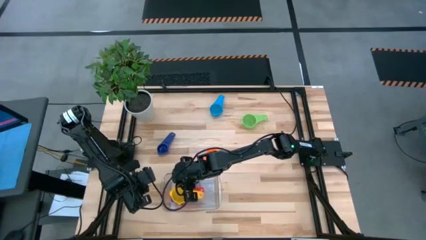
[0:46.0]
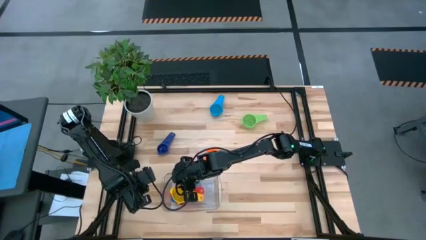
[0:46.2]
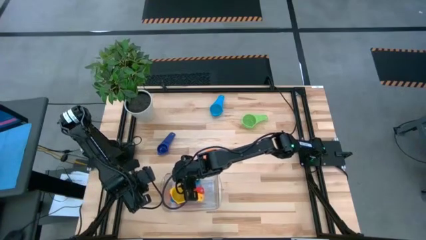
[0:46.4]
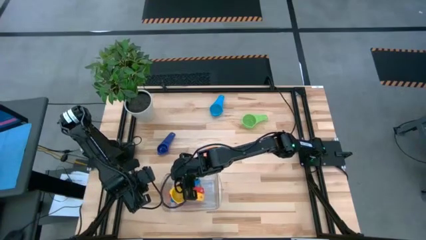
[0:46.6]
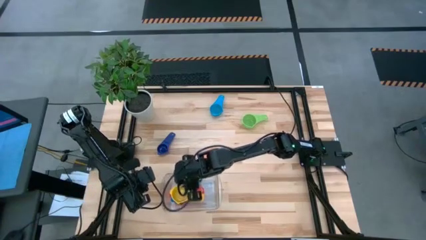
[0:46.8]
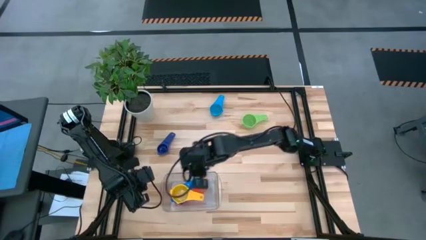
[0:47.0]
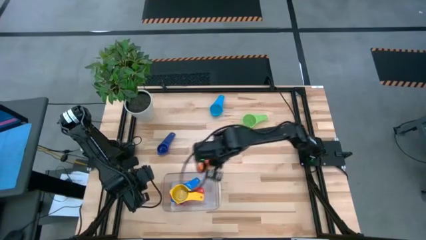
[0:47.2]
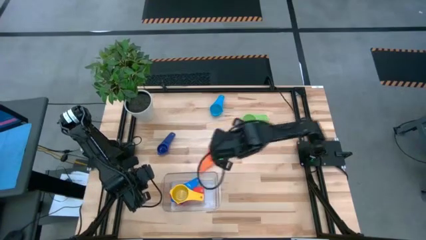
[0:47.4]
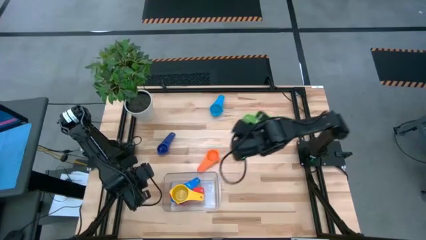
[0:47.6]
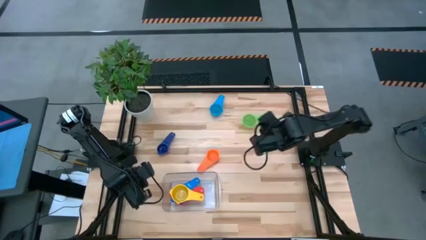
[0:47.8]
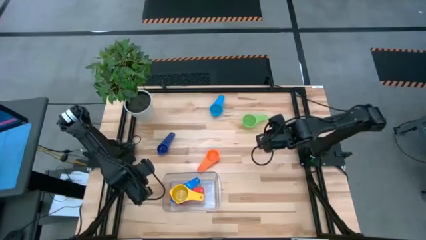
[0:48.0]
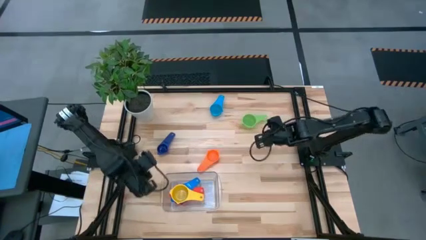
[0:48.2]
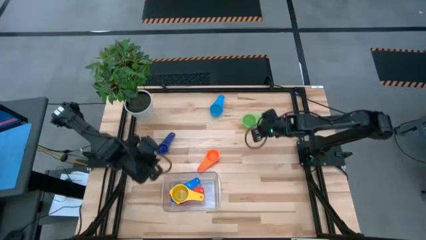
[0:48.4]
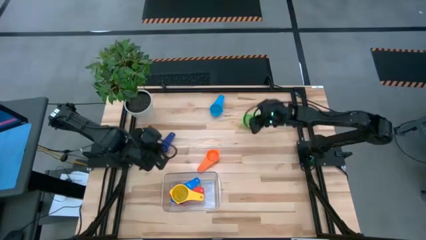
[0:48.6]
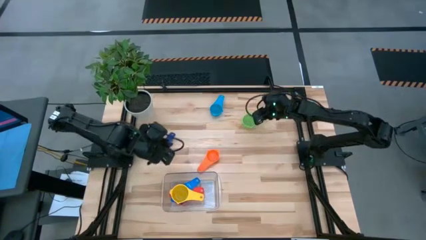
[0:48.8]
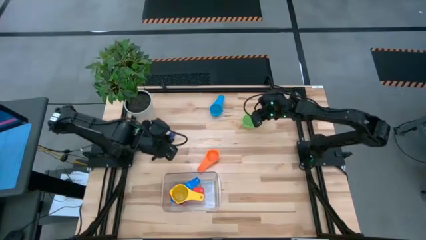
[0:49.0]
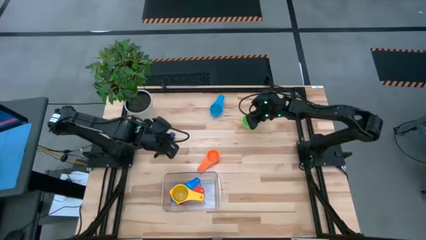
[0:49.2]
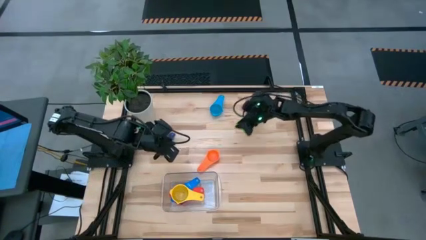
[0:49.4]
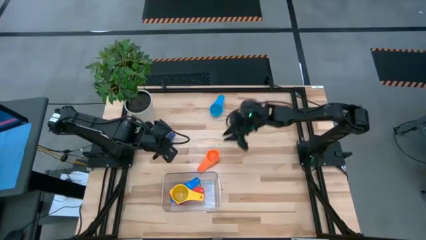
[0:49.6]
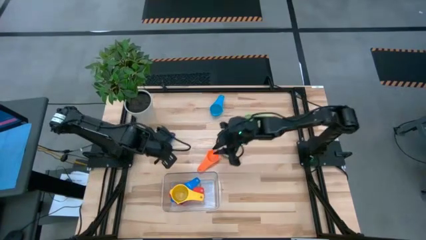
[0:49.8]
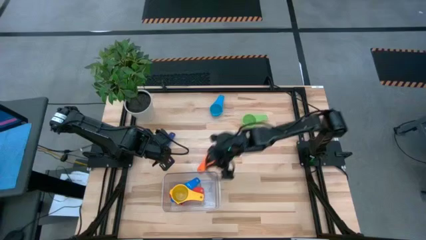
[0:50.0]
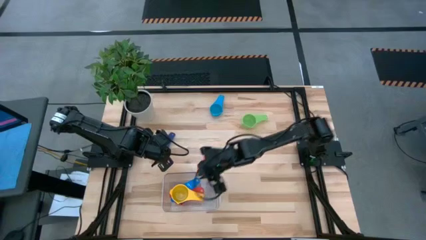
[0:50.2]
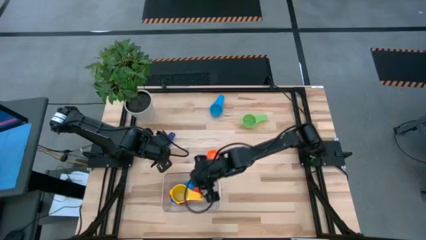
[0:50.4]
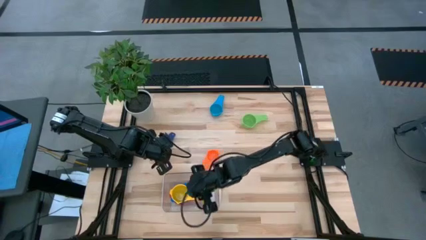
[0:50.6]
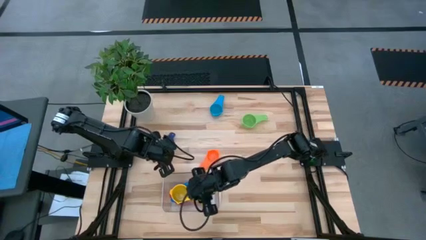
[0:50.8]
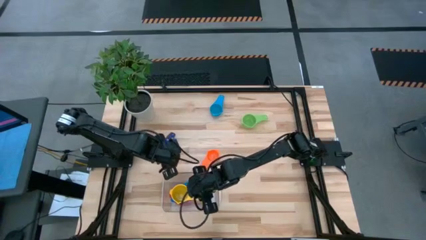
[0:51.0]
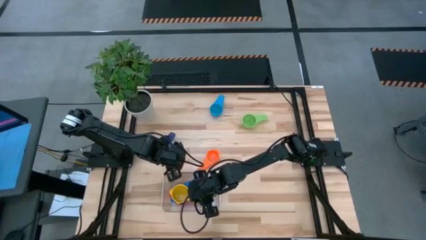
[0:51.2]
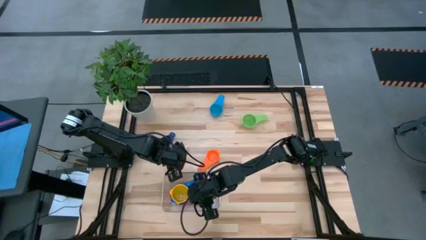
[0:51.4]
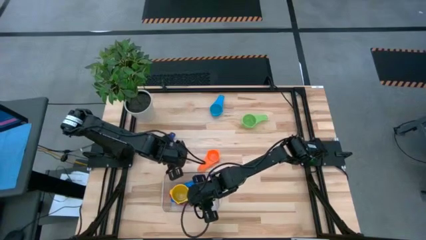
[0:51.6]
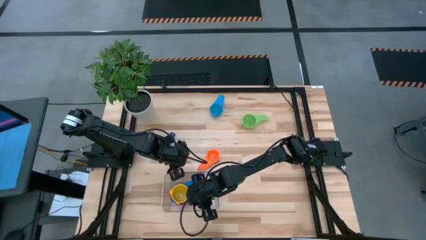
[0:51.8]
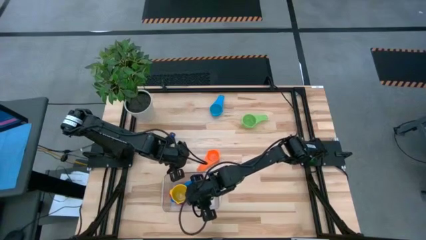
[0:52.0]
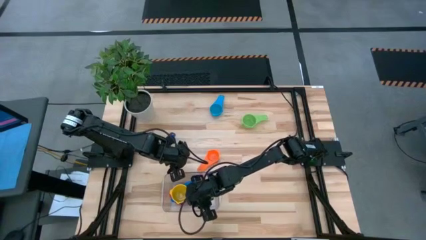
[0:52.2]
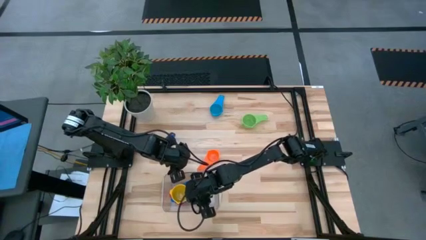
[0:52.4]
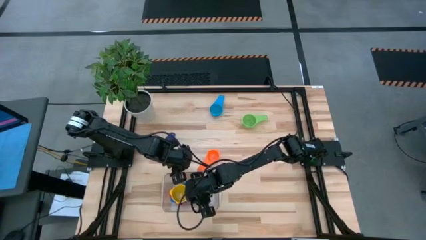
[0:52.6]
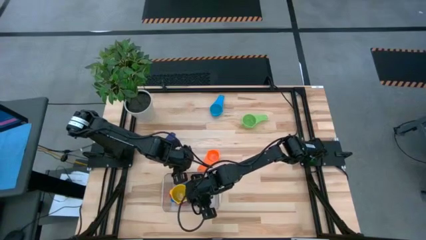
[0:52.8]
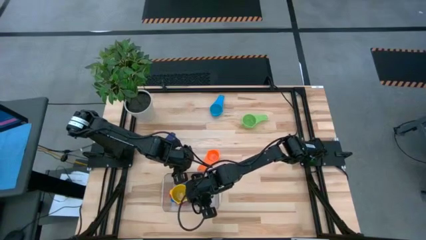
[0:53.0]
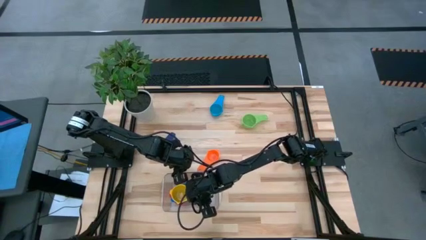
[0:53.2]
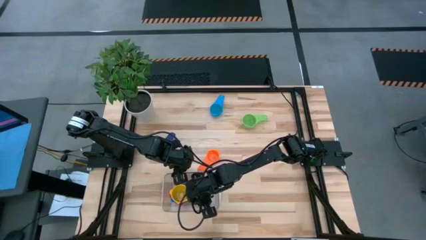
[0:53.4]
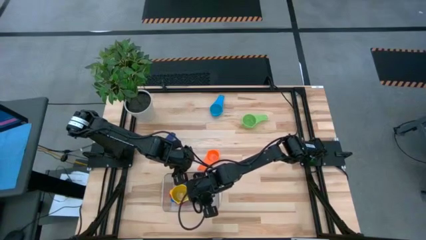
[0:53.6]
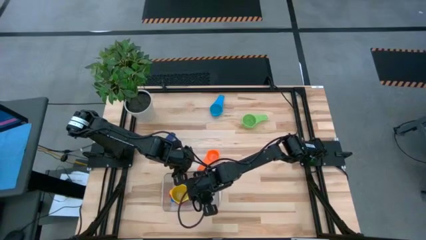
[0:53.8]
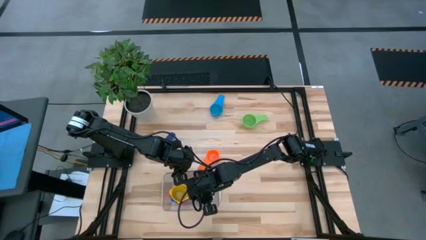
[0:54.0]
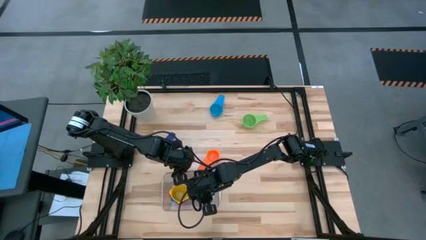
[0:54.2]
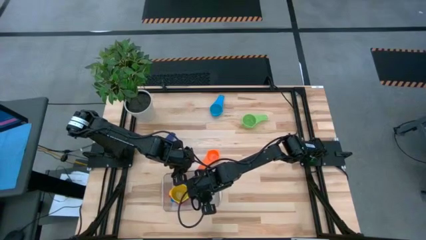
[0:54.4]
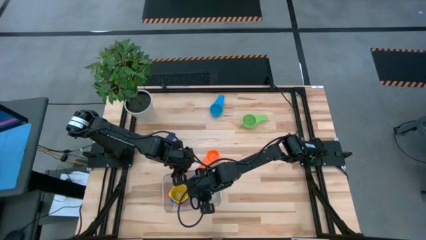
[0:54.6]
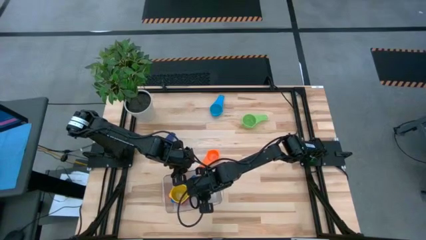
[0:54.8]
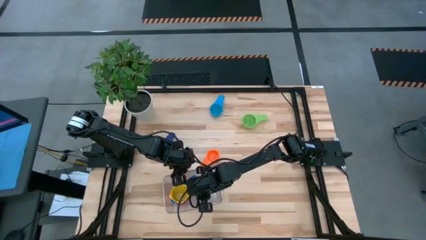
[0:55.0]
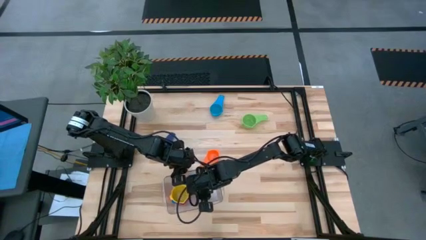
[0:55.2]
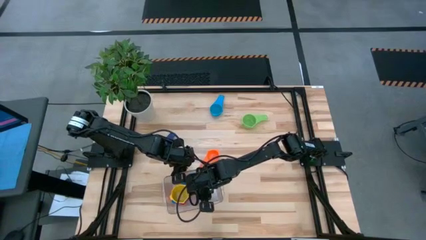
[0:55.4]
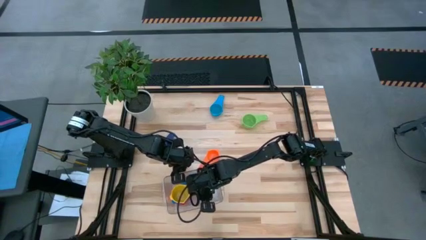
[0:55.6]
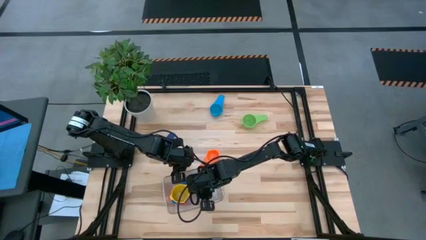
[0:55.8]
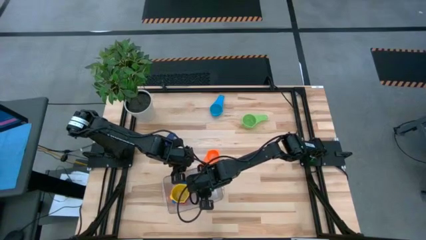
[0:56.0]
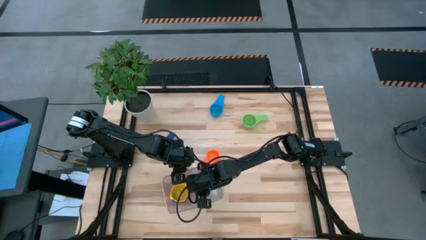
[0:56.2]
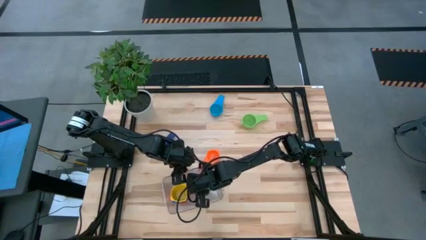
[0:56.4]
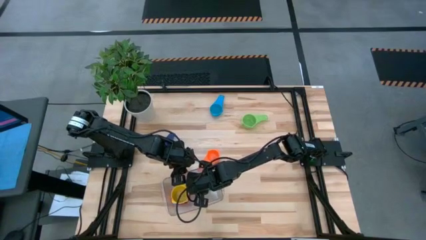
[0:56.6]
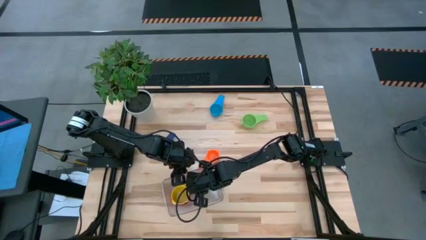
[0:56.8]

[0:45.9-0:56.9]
Task: Nest measuring cups in basket
Stack the yellow measuring cup on top of the blue measuring cup into the transparent bin

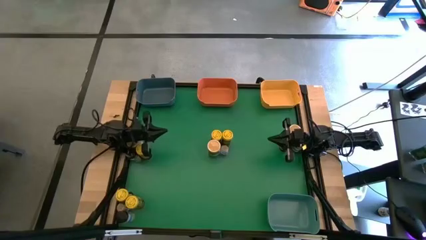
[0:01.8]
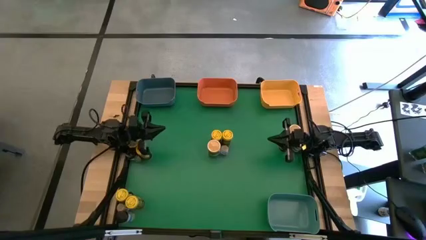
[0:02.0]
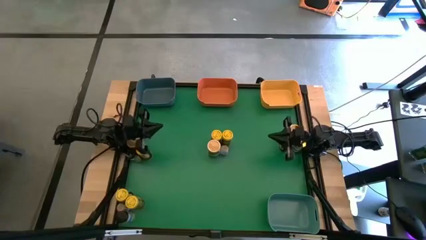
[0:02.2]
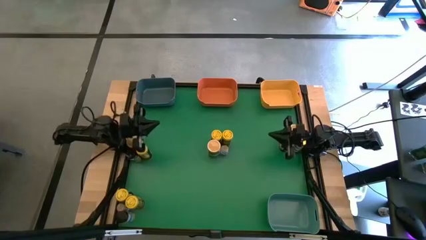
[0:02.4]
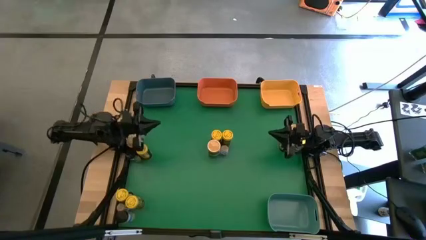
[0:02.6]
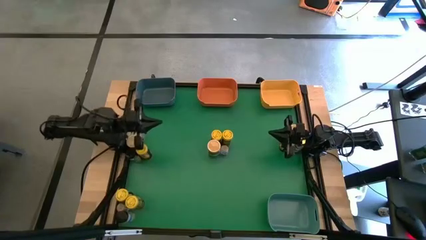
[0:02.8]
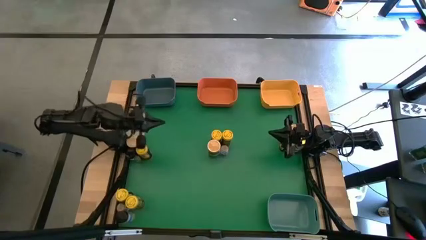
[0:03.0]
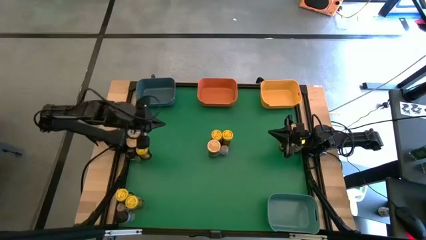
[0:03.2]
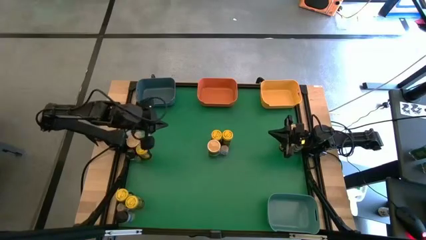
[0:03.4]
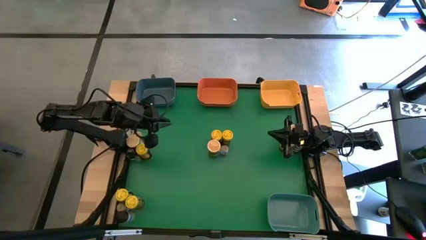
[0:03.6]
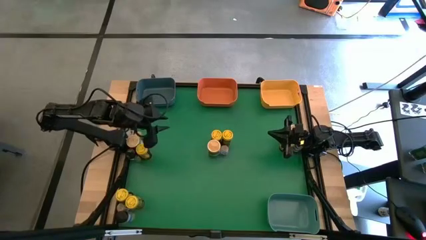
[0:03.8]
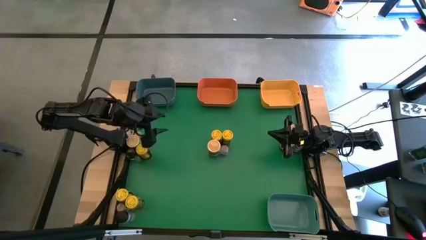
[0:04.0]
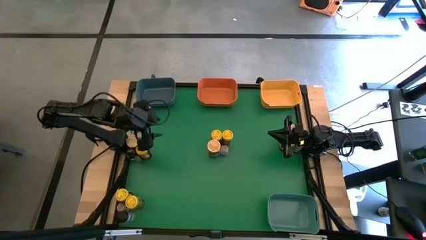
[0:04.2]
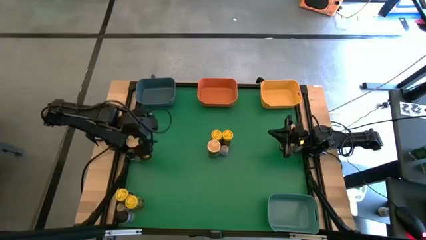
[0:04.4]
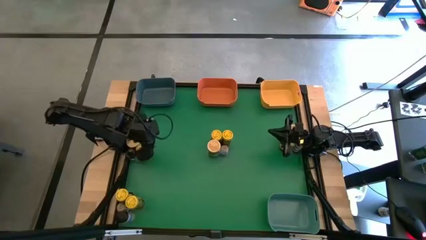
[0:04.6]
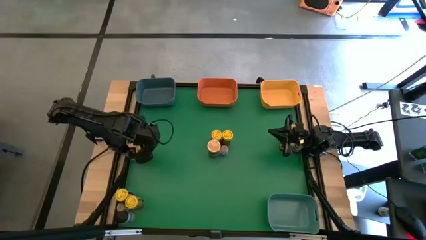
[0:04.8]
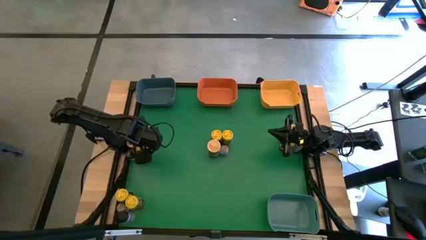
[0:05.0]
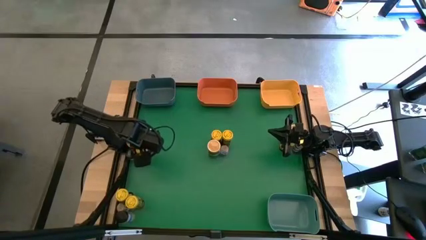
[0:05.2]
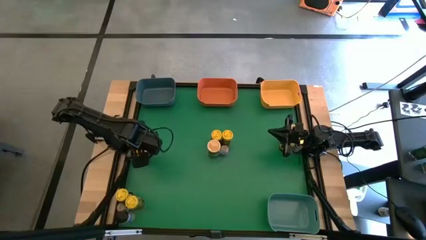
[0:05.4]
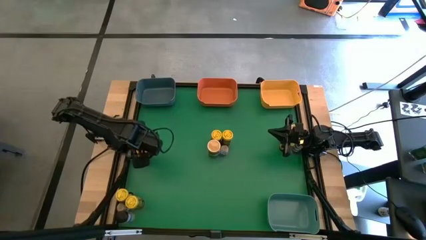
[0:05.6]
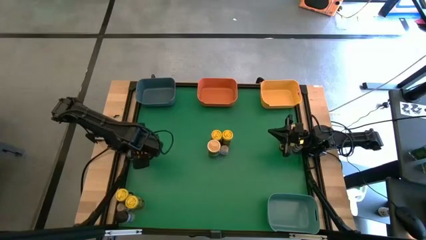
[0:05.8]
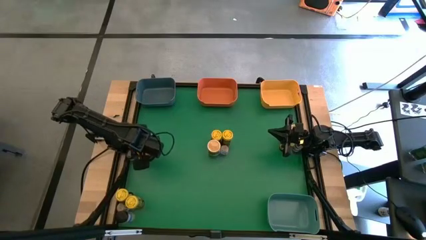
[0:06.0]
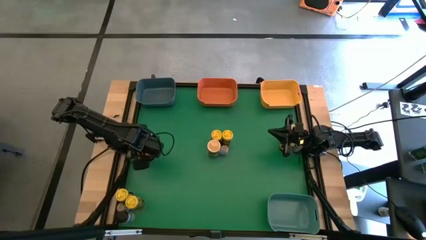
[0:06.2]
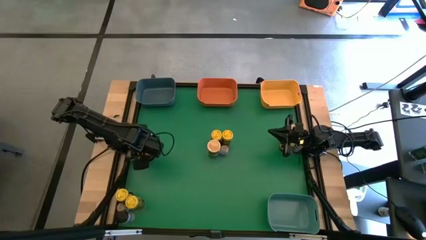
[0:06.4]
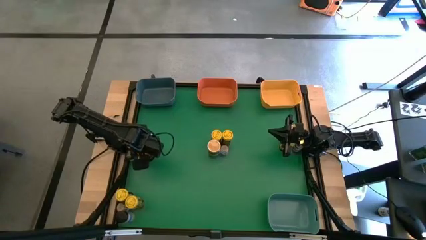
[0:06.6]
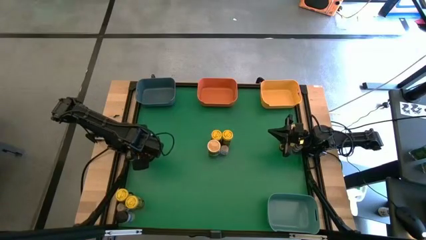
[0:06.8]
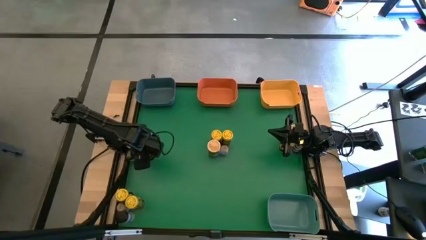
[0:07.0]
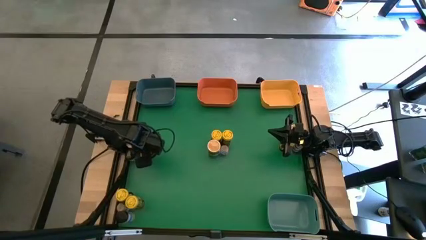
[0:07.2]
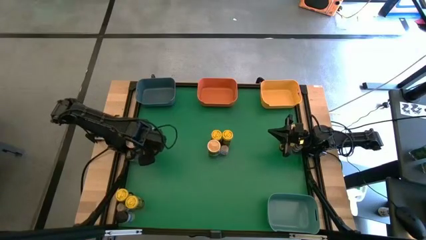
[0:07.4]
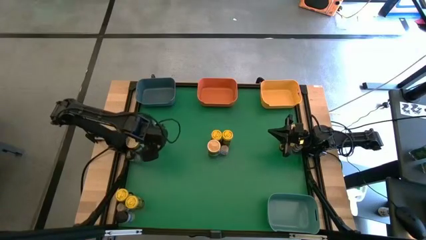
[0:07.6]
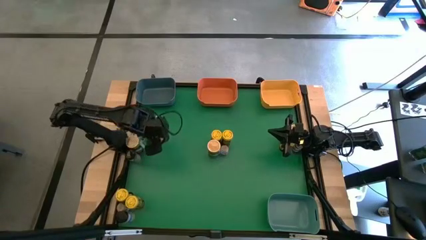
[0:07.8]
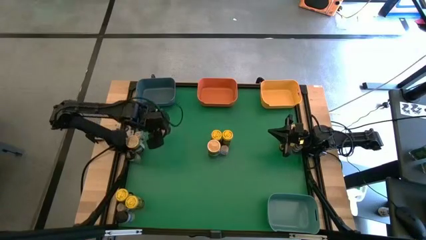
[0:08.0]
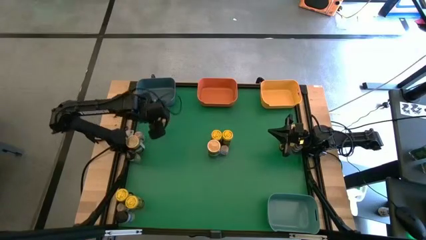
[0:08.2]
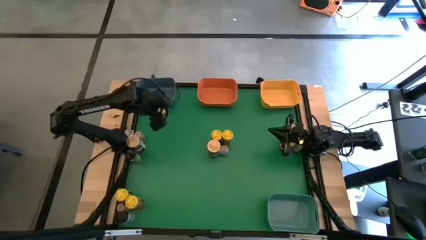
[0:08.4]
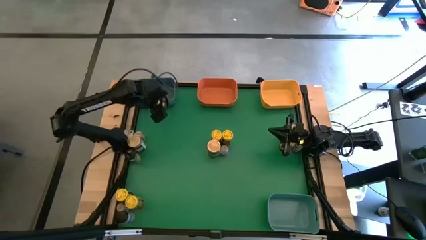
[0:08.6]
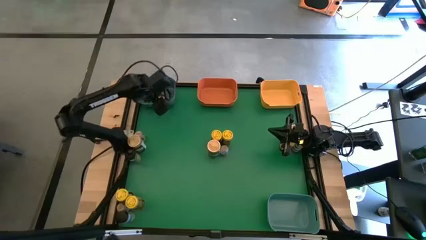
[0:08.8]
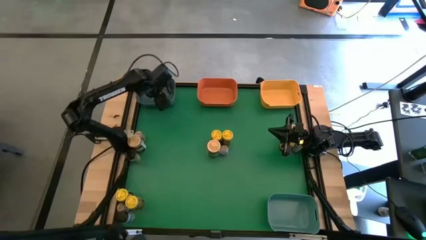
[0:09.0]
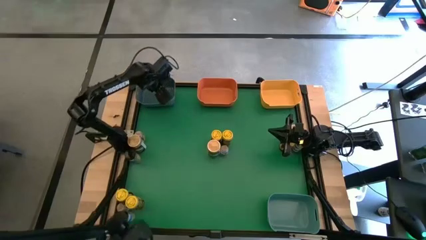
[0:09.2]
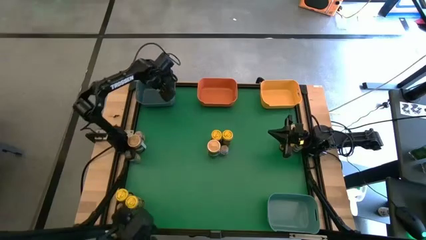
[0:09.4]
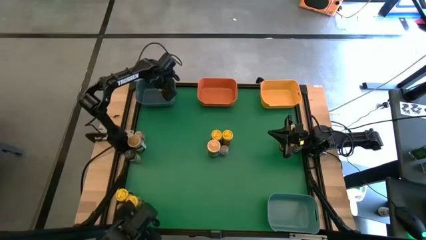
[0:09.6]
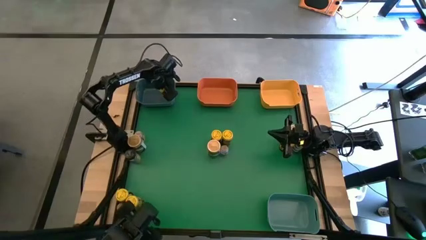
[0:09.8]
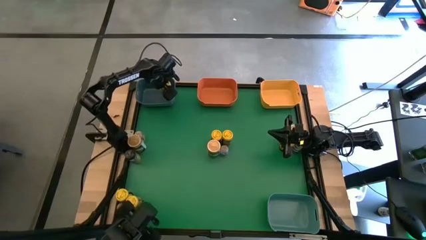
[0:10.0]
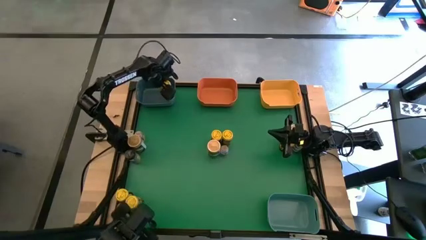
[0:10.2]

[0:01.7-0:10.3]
Task: Sort spices by type
Put the yellow seasoning bottle into the blue bin
